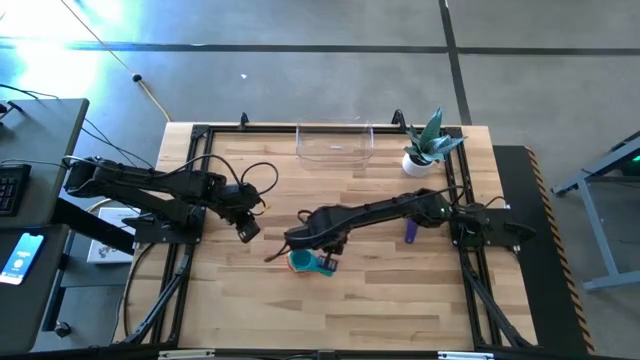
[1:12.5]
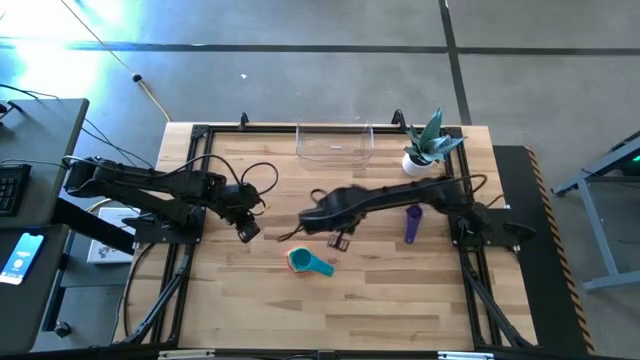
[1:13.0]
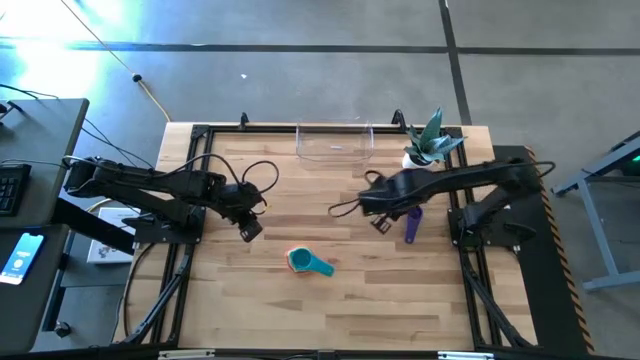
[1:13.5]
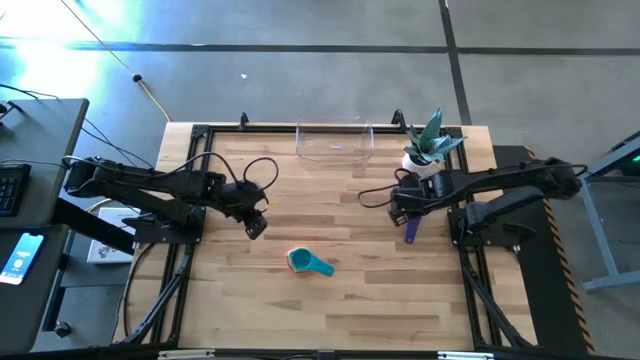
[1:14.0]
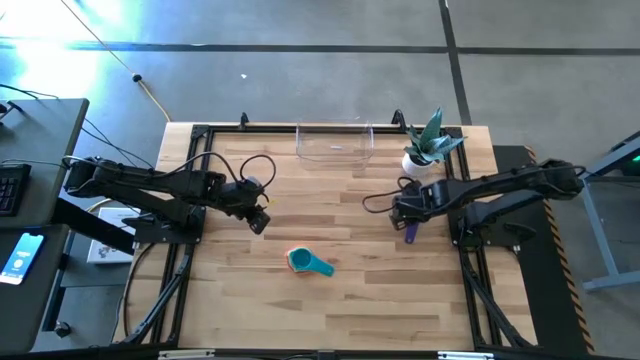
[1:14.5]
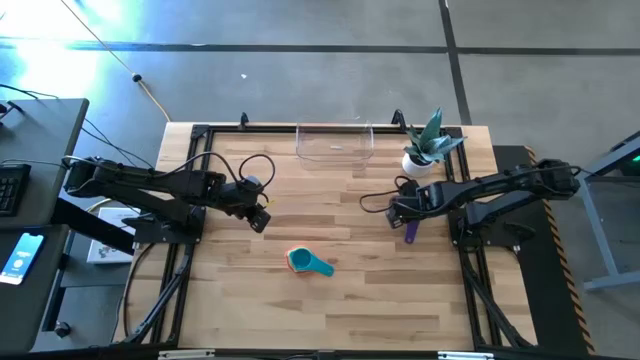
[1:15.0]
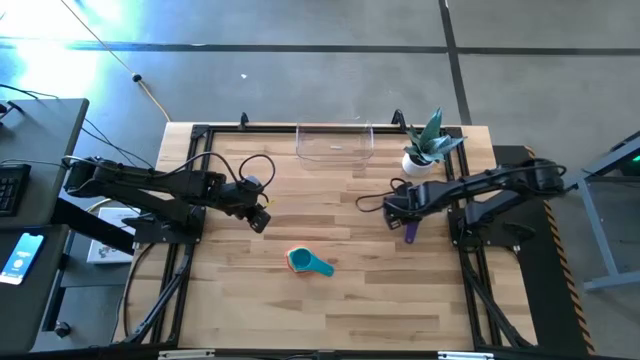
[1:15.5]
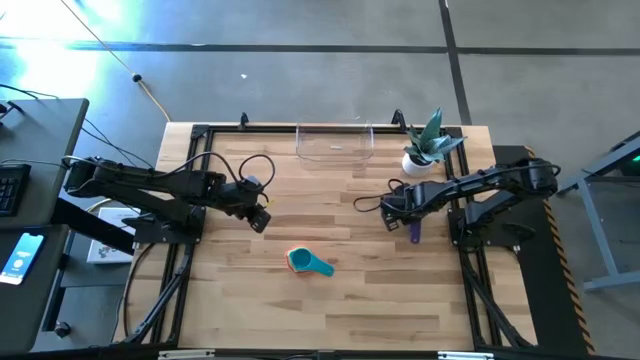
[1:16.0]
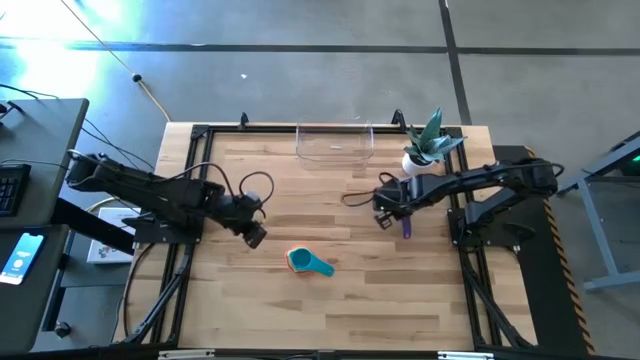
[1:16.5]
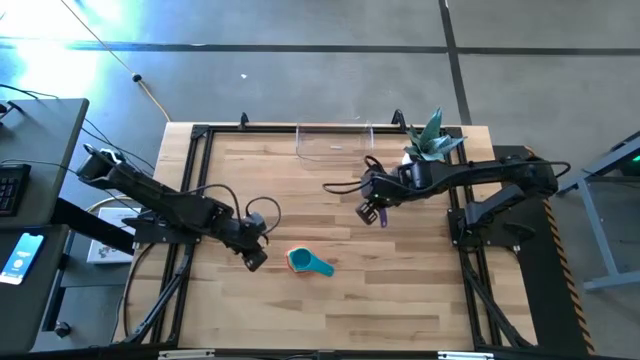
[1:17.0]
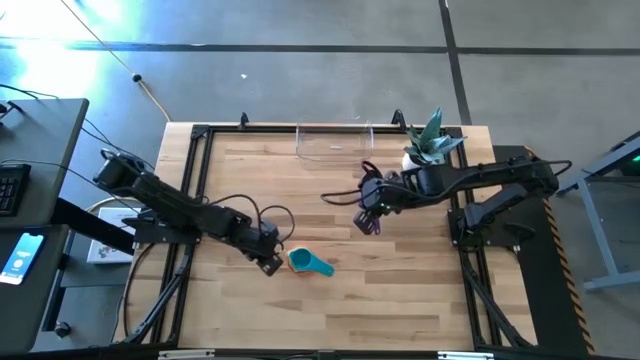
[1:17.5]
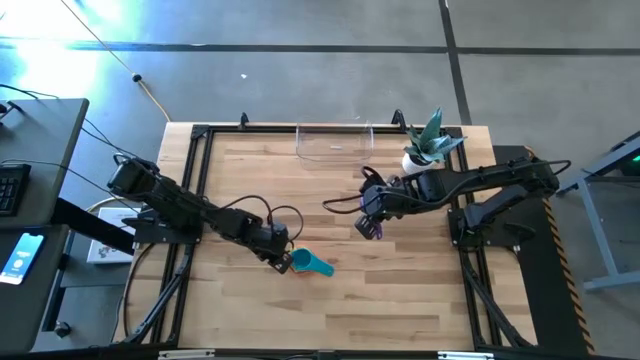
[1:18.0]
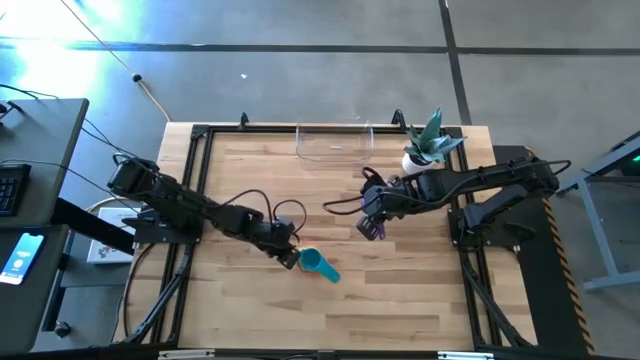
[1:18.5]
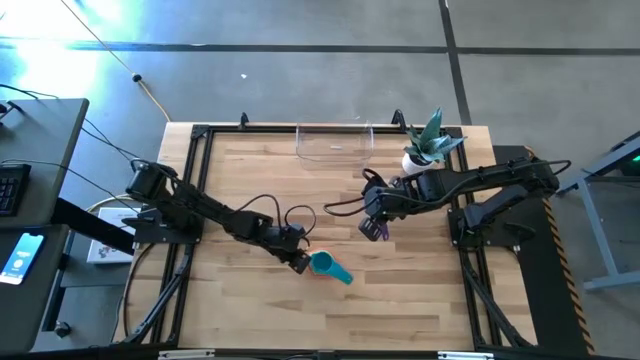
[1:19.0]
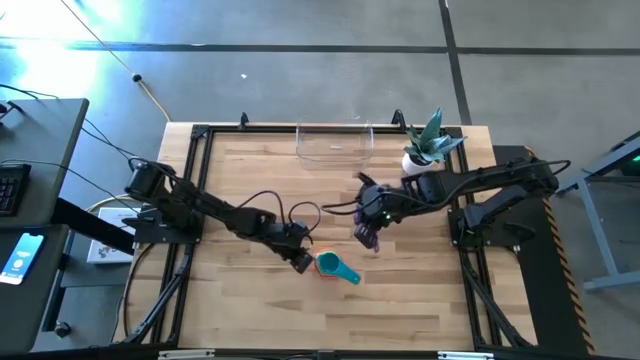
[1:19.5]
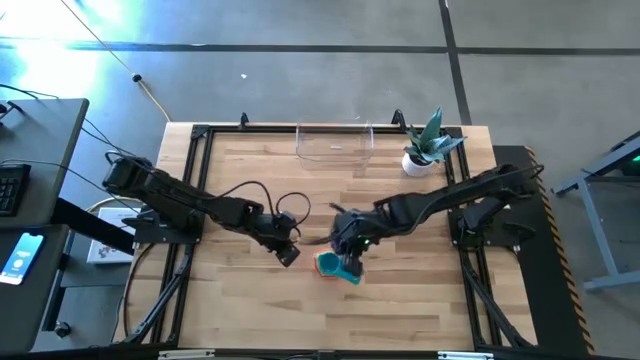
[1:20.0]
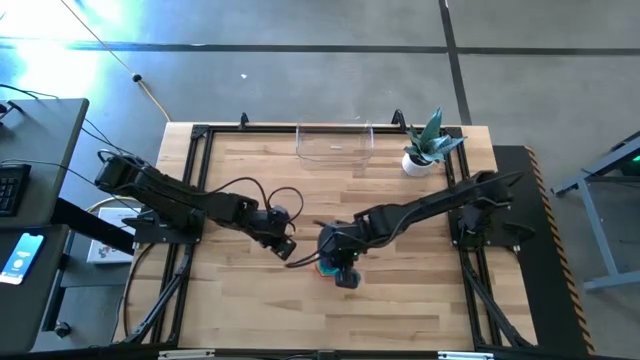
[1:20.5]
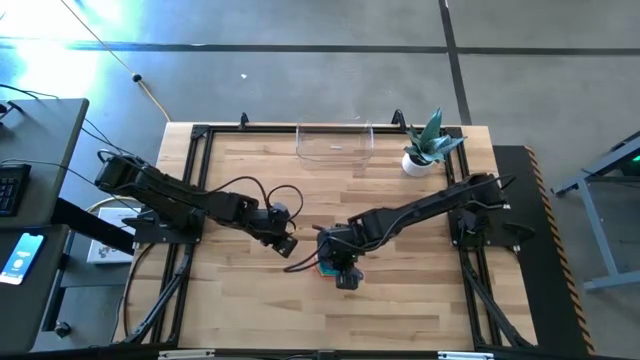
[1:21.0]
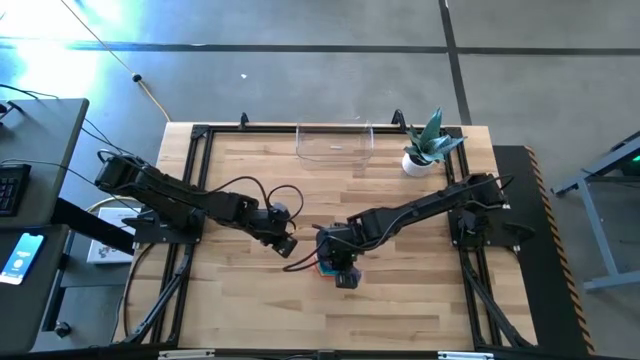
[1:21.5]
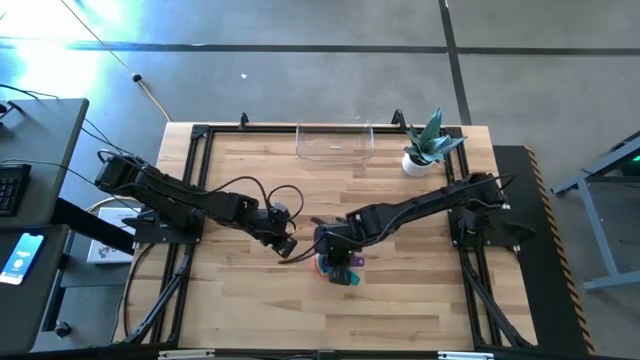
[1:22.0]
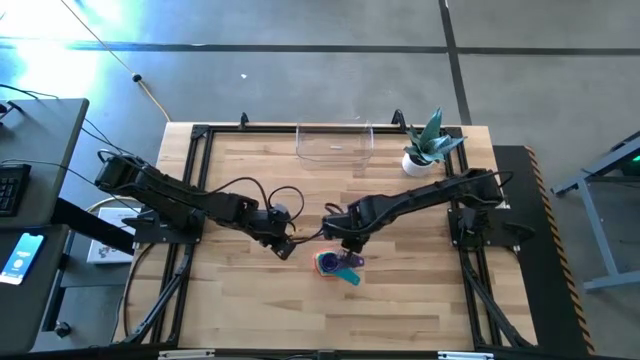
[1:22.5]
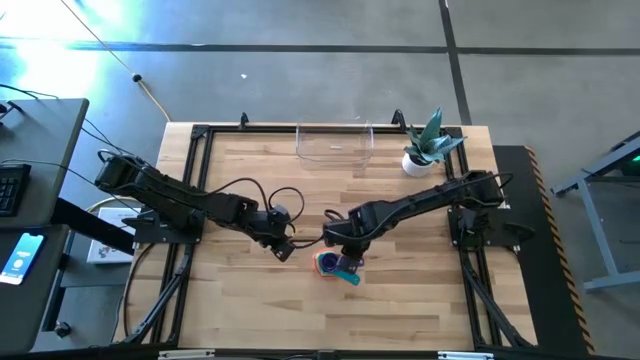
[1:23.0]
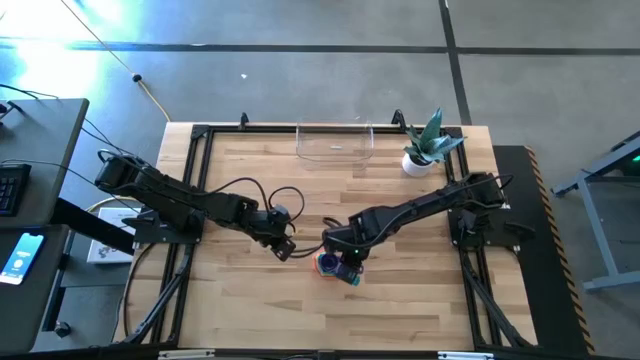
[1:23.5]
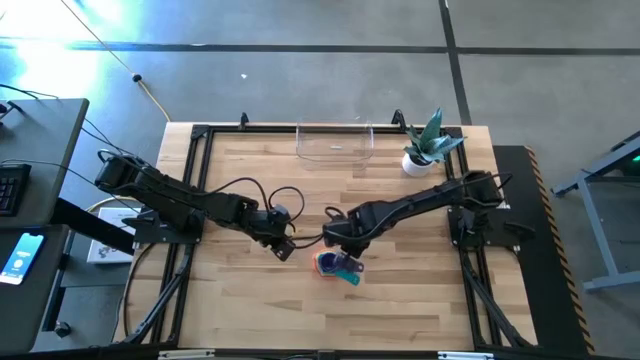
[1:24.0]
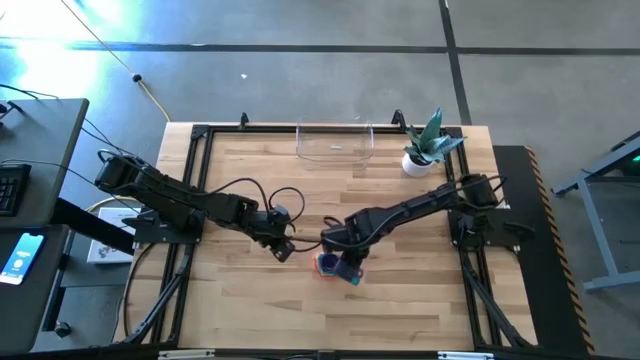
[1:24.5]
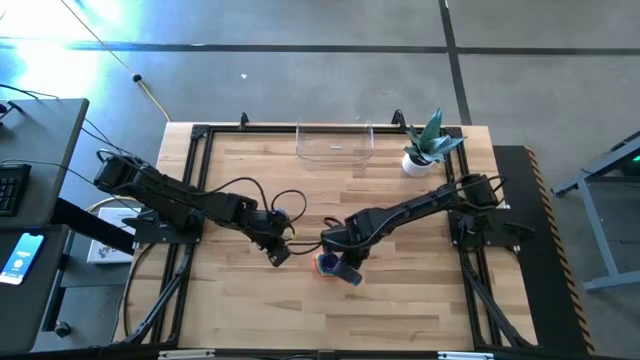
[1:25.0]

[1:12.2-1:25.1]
Task: Nest measuring cups in basket
Stack the violet measuring cup on top of the light blue measuring cup

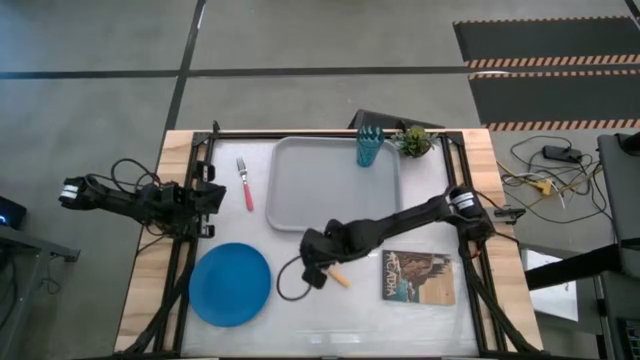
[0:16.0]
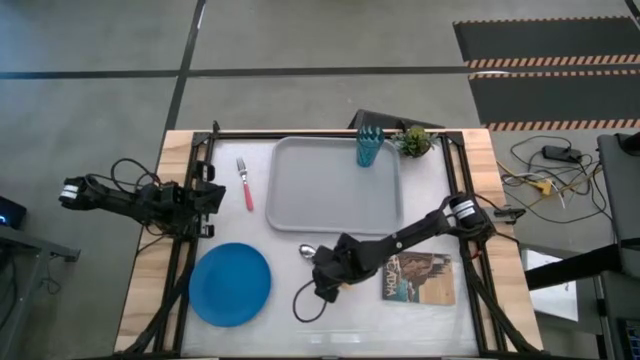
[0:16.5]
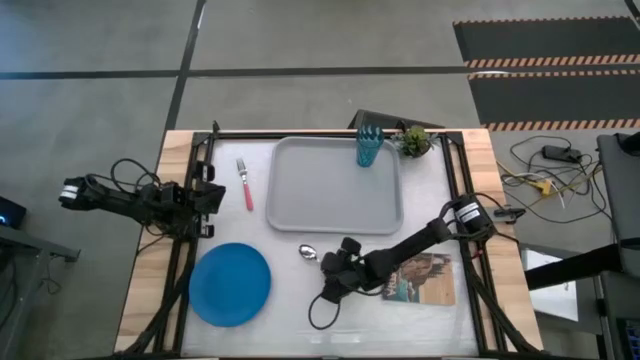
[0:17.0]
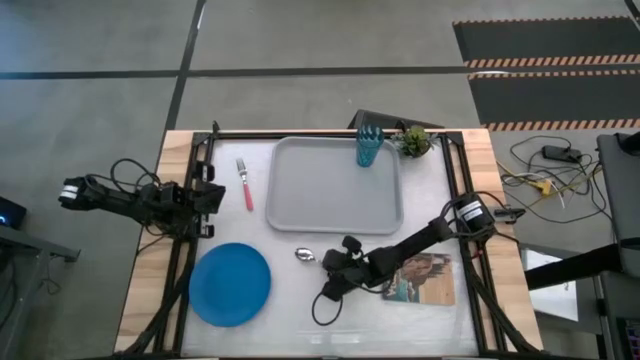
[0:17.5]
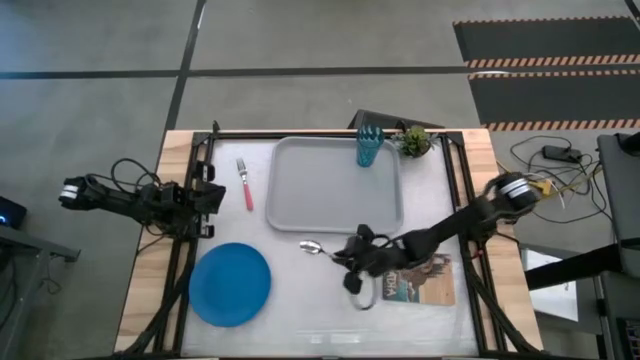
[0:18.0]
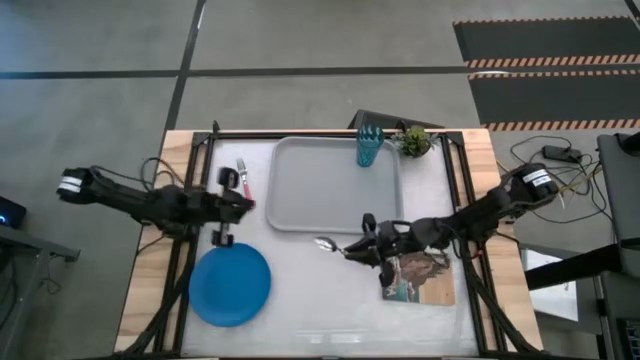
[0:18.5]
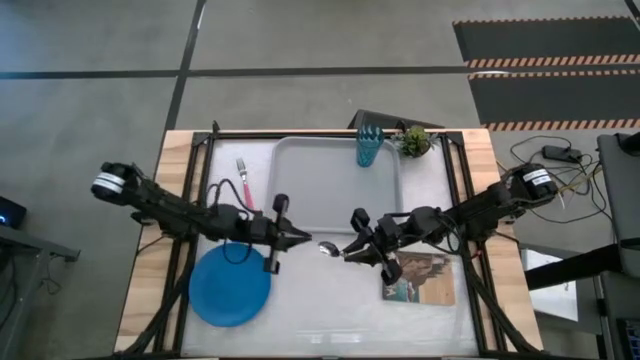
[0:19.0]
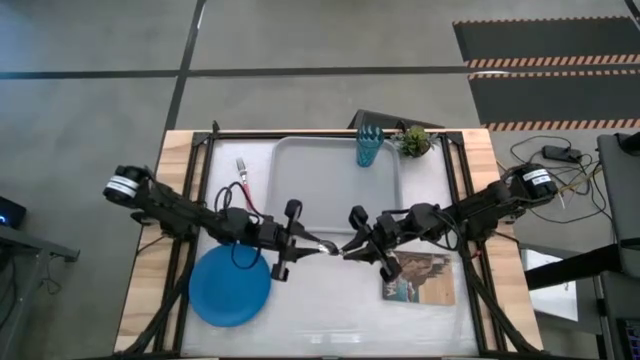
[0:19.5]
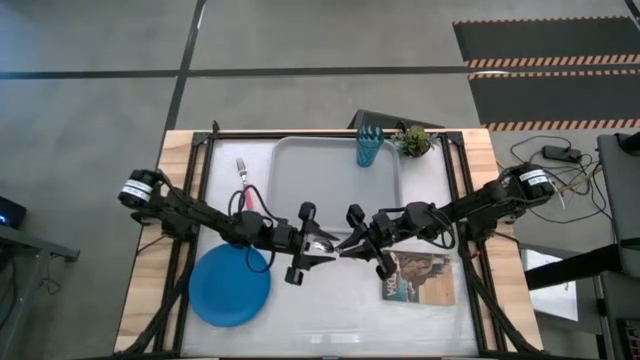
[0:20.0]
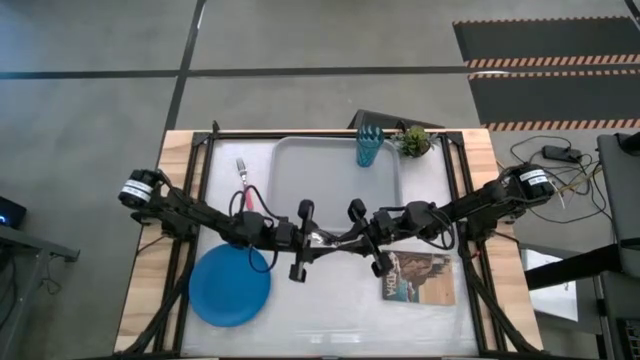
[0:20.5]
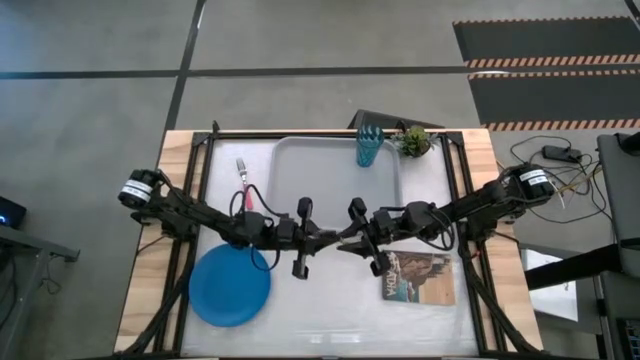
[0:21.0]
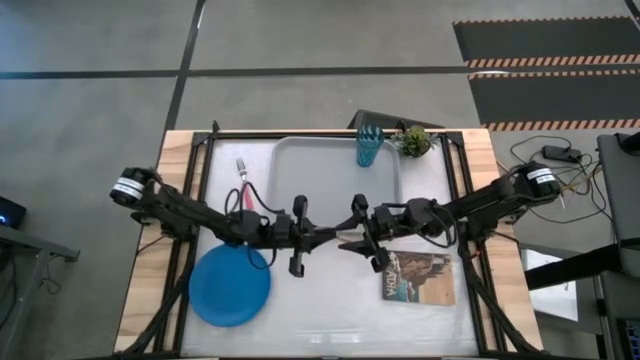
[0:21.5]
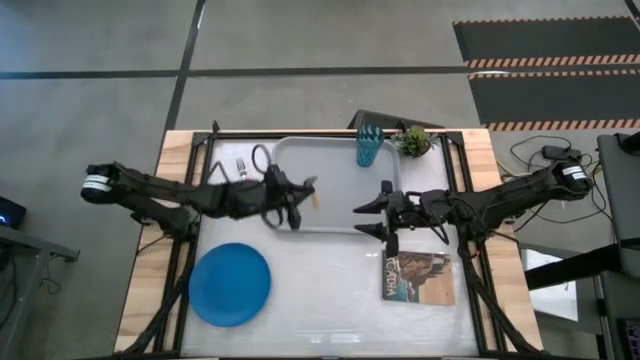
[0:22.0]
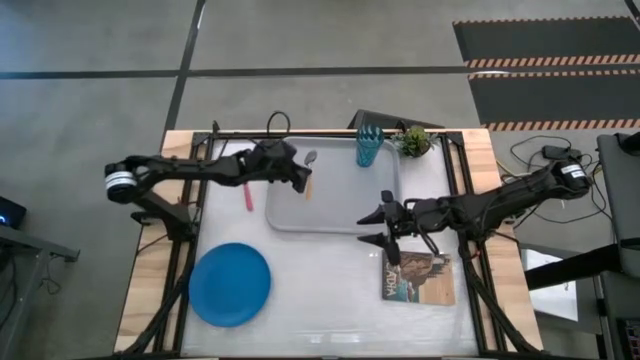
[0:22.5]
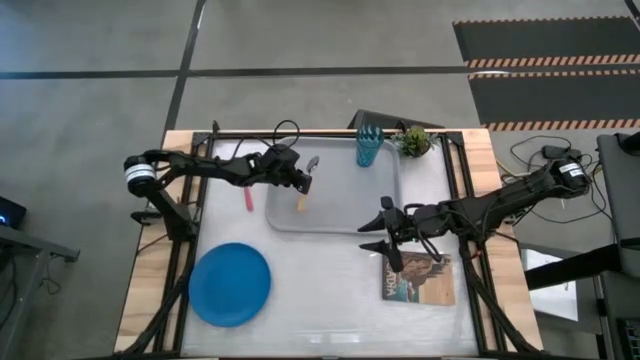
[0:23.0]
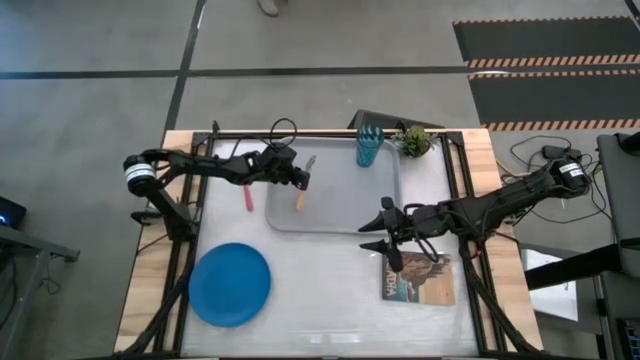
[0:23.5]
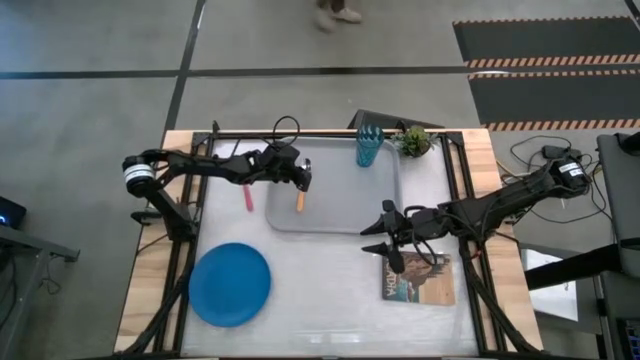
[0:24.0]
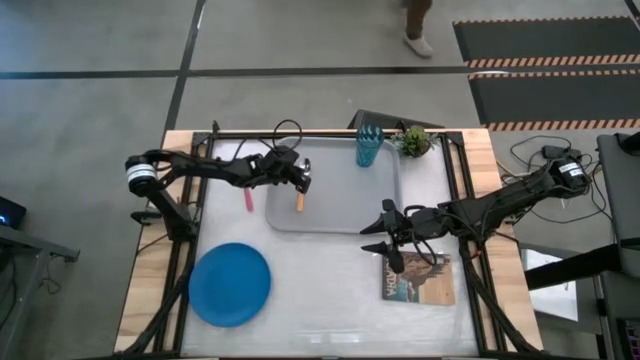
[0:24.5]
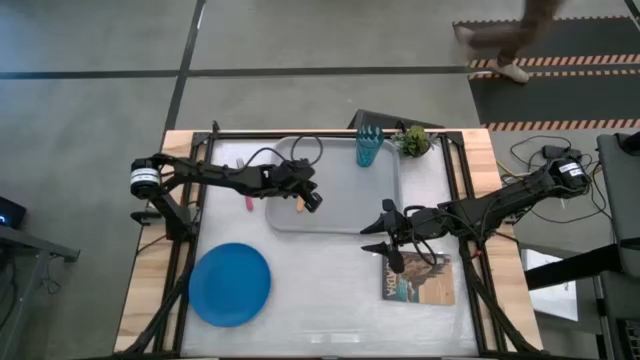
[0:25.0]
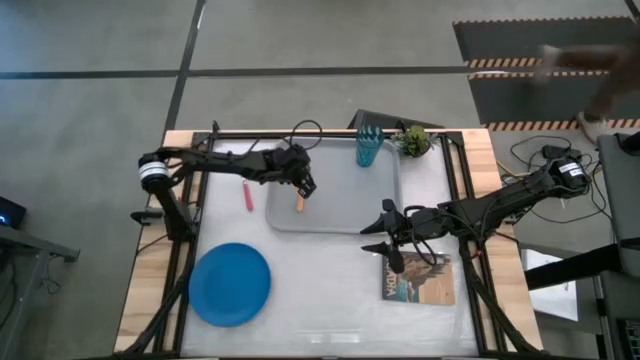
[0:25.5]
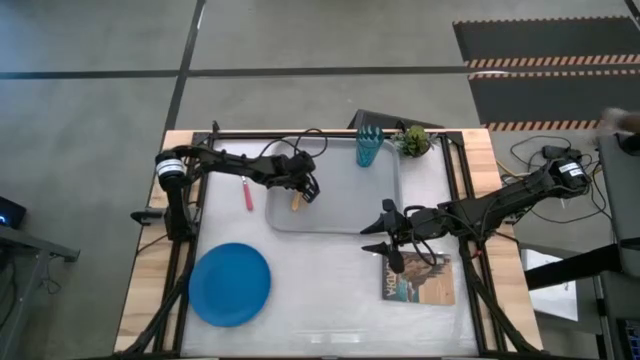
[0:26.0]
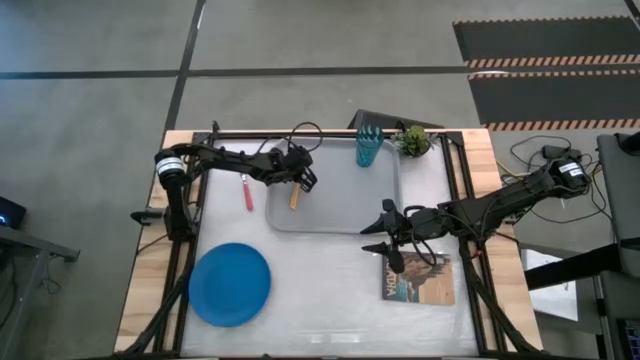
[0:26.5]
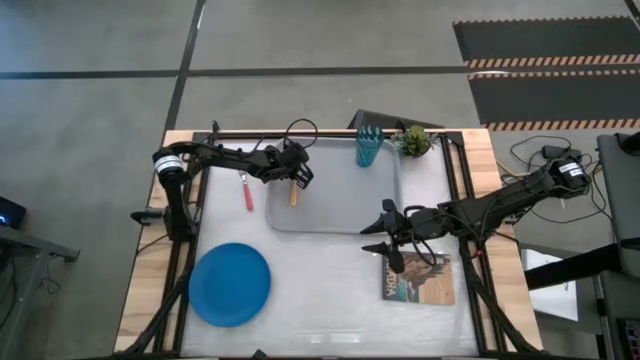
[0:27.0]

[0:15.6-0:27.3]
Task: Pick and place plate/cup/fork/spoon on tray
Put the yellow spoon to the left side of the tray
